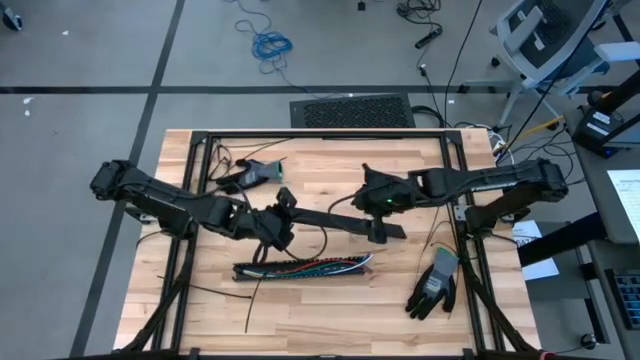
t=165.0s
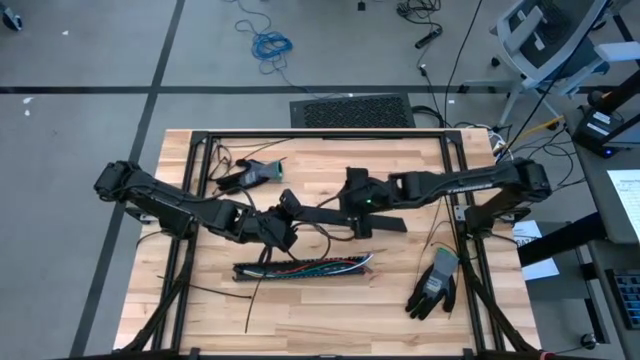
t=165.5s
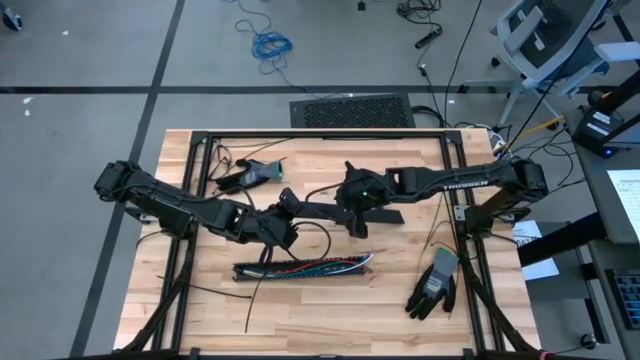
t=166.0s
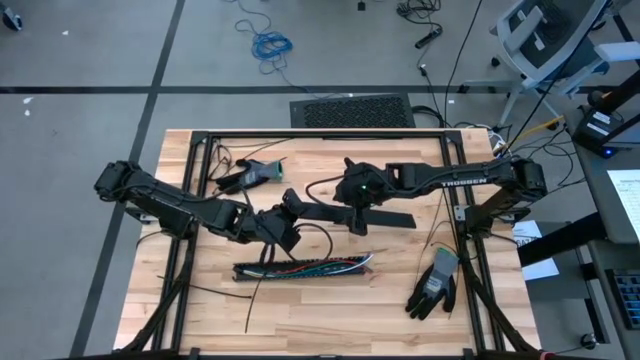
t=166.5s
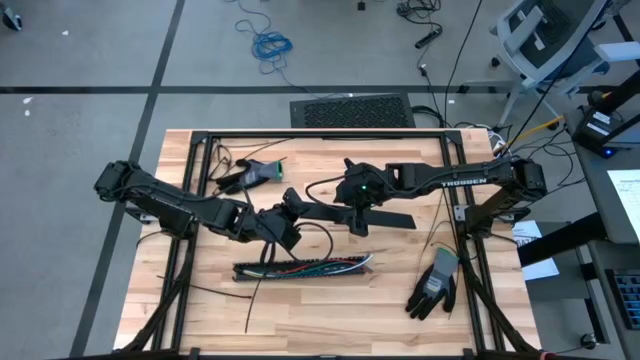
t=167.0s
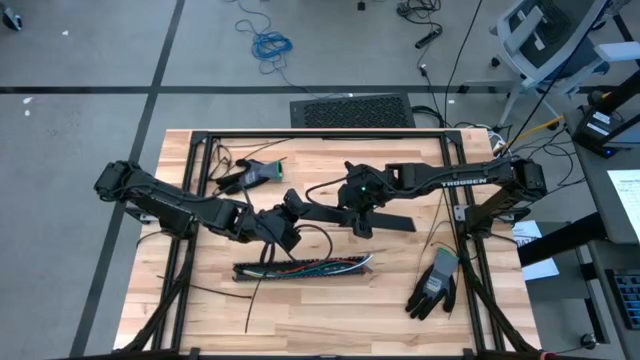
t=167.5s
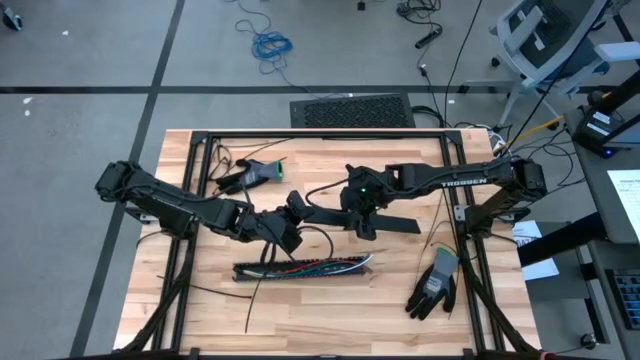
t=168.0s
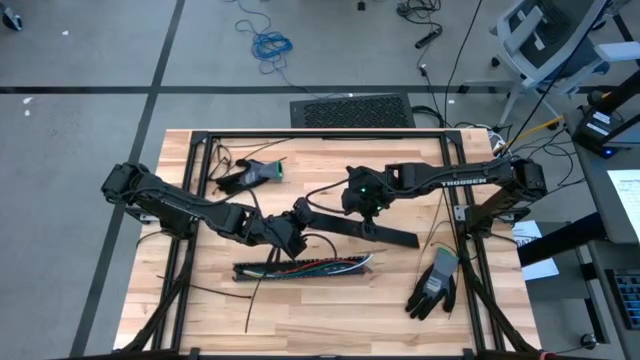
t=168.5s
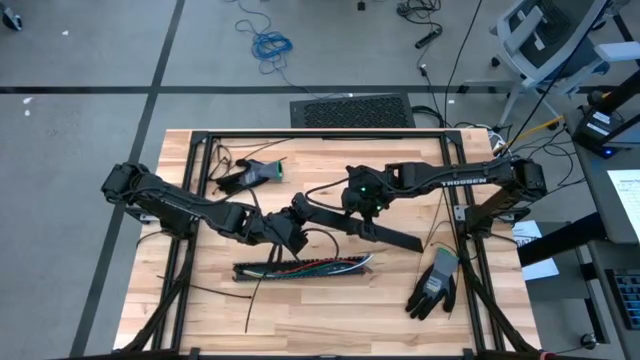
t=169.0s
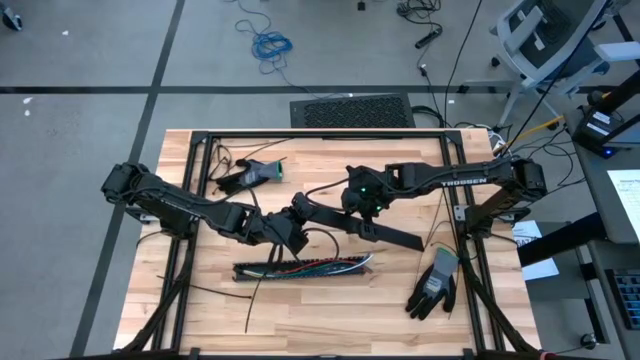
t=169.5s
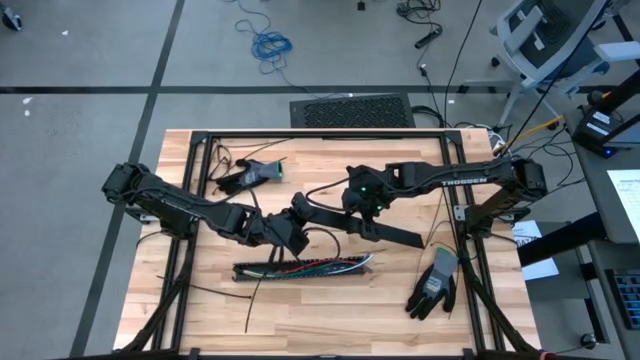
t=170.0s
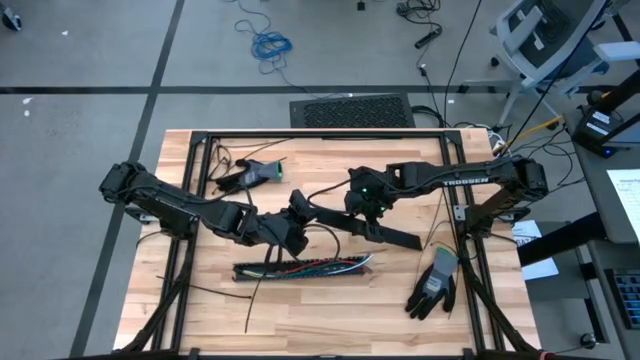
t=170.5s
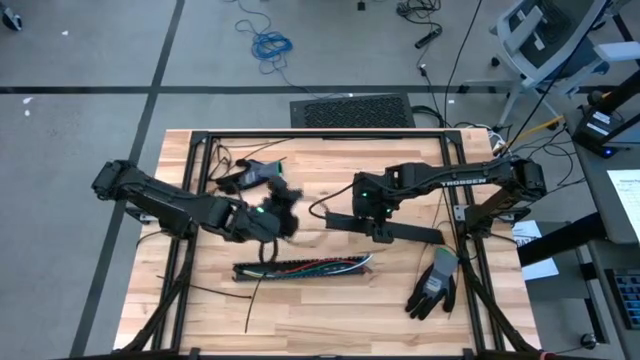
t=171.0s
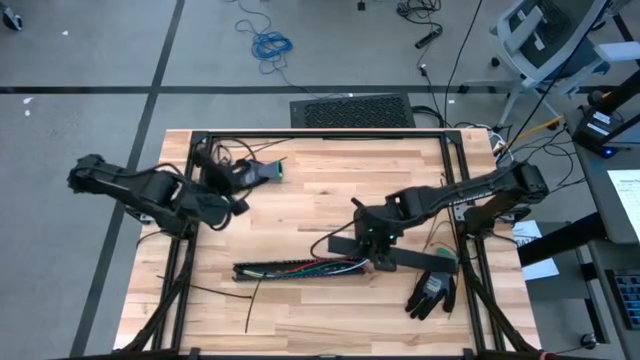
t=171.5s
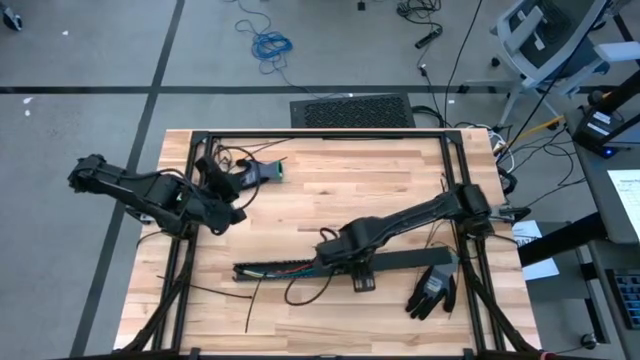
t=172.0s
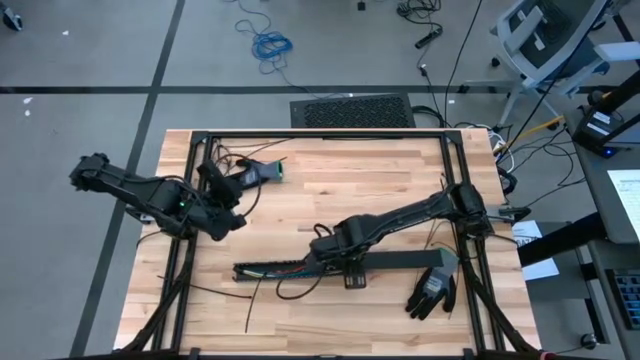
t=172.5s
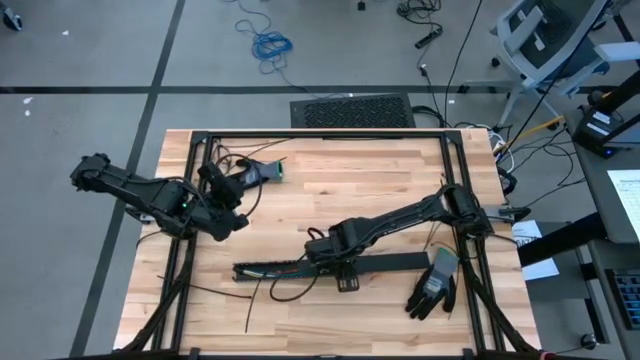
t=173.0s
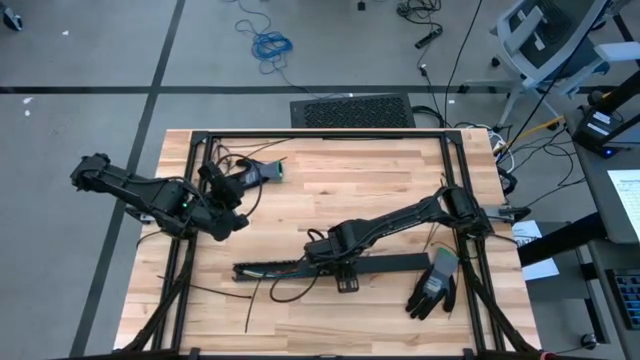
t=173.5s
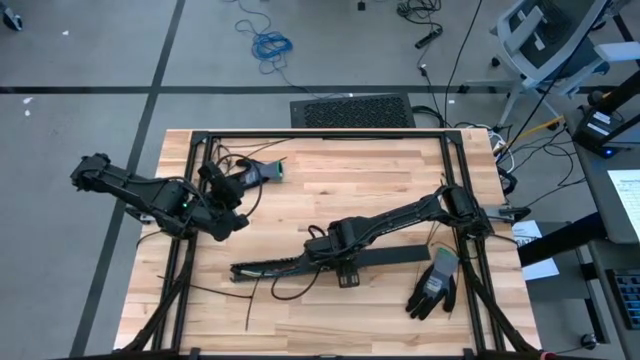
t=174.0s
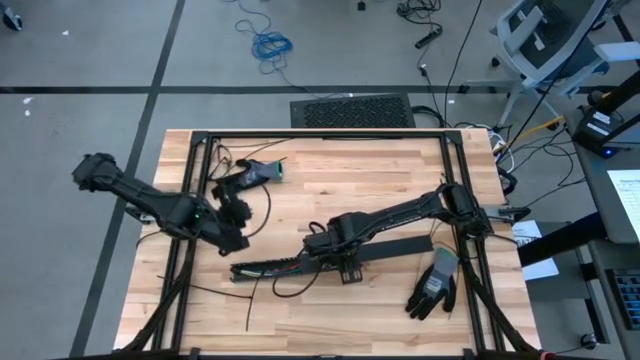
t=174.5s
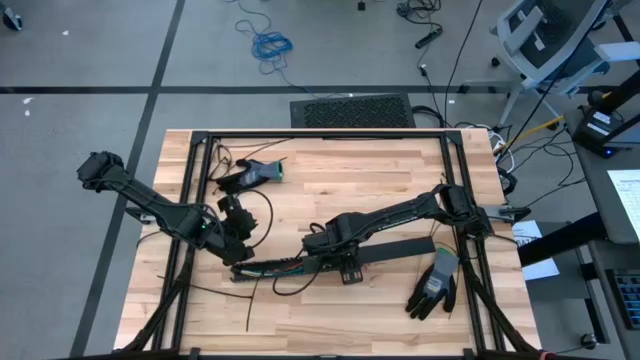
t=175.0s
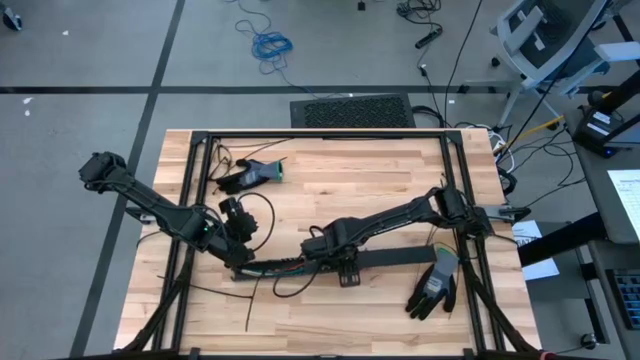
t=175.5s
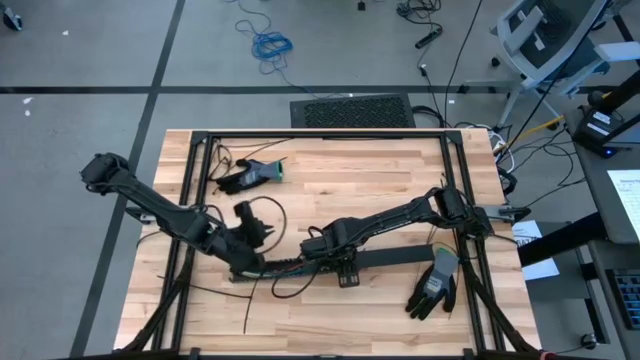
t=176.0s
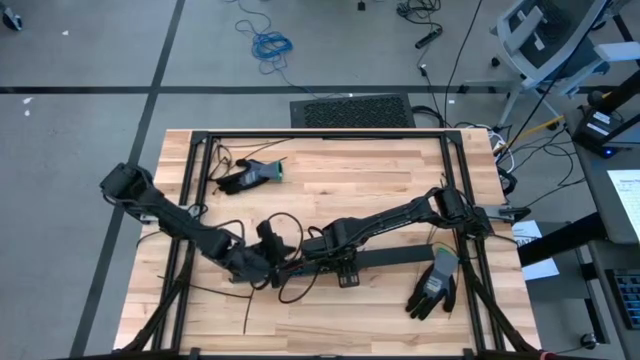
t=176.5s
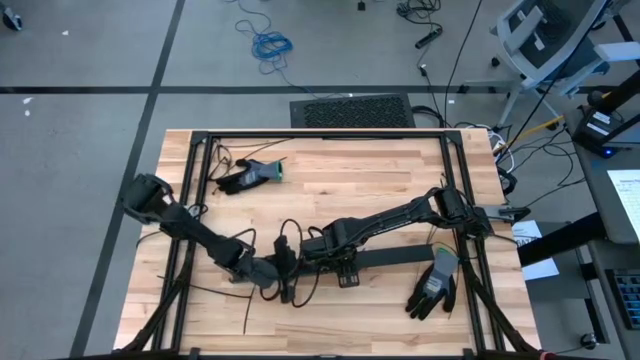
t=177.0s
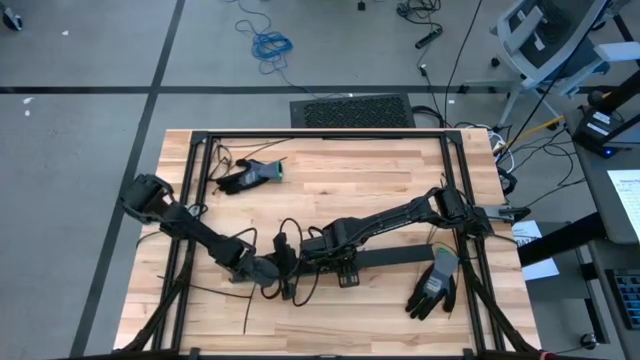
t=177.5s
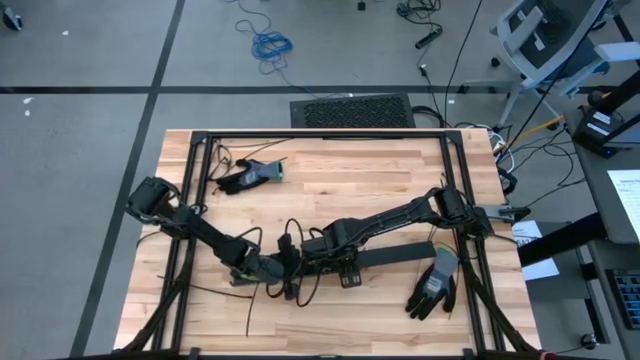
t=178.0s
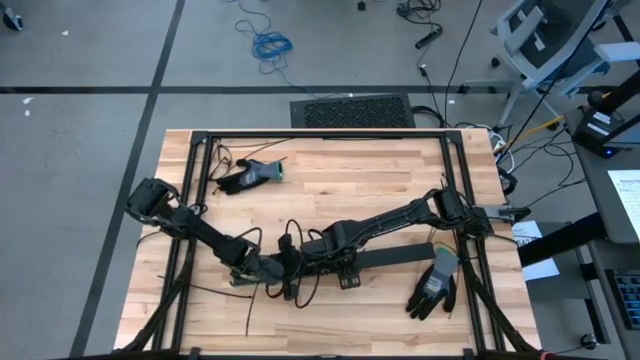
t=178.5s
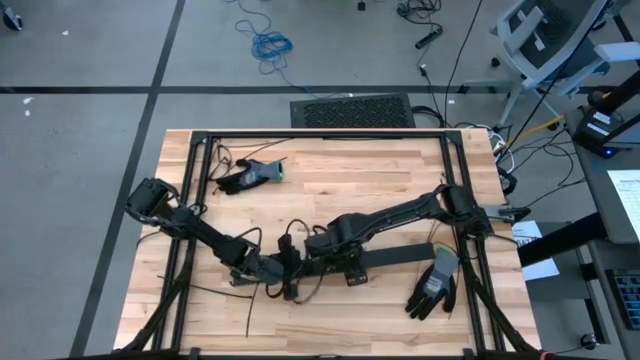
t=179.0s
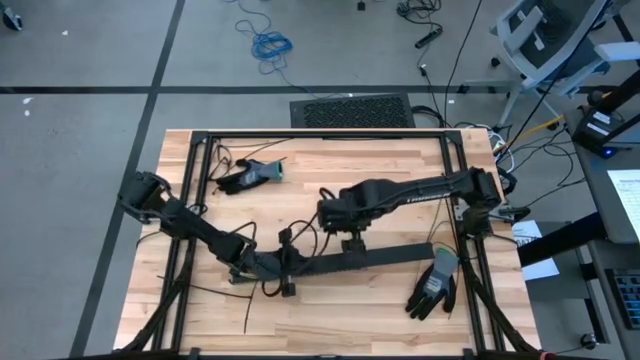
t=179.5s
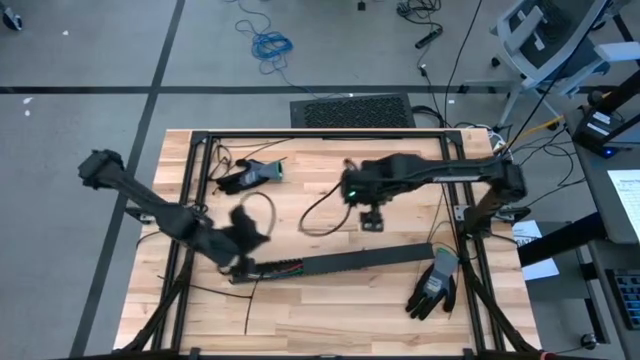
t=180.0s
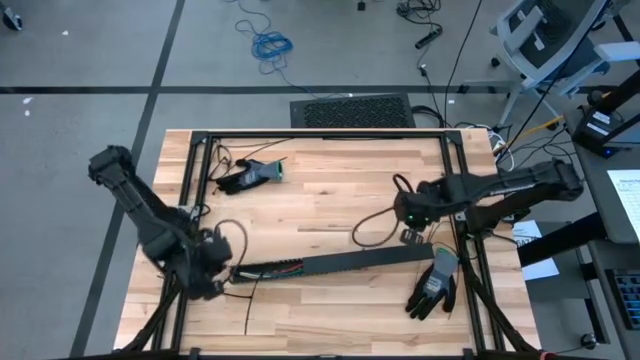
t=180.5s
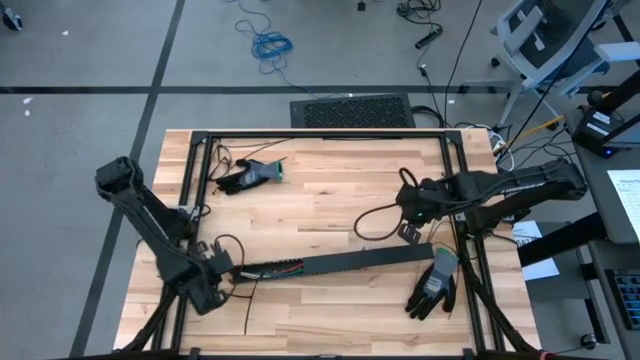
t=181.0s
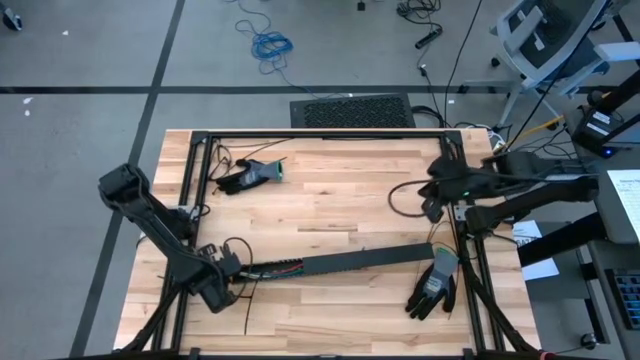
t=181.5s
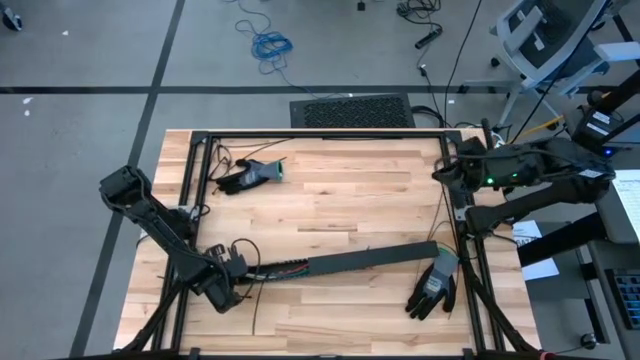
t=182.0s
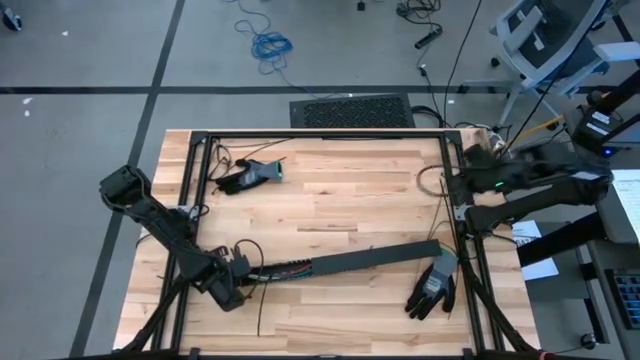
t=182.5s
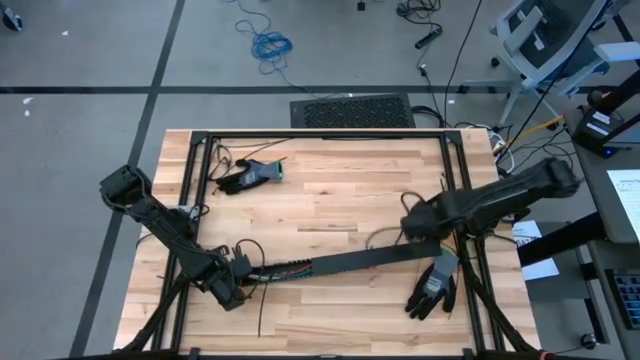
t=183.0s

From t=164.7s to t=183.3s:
Task: Ziptie cables
Close the black cable duct

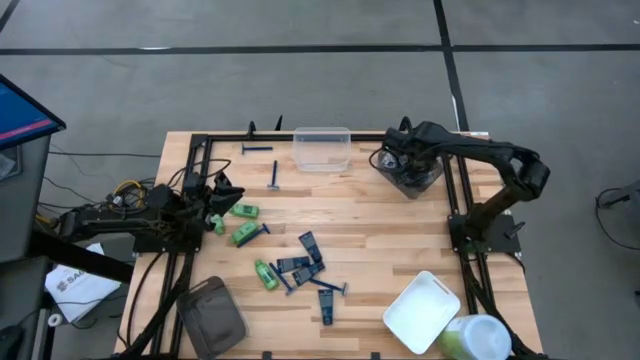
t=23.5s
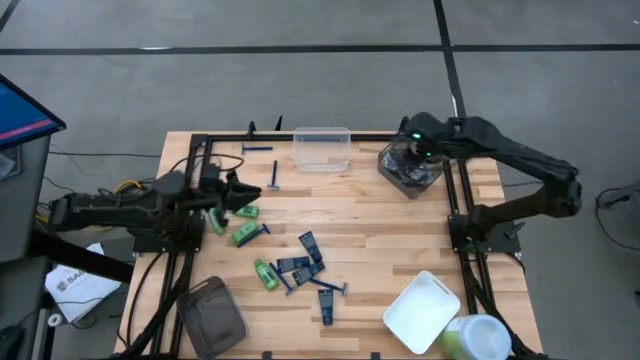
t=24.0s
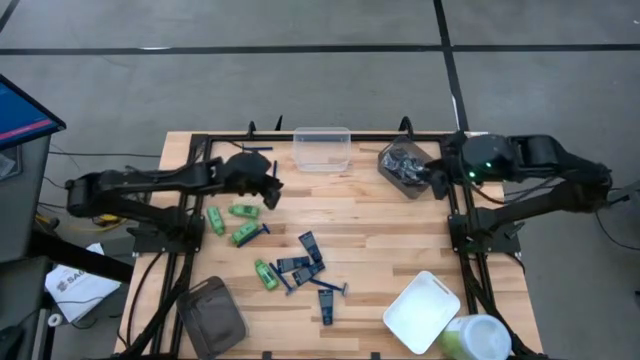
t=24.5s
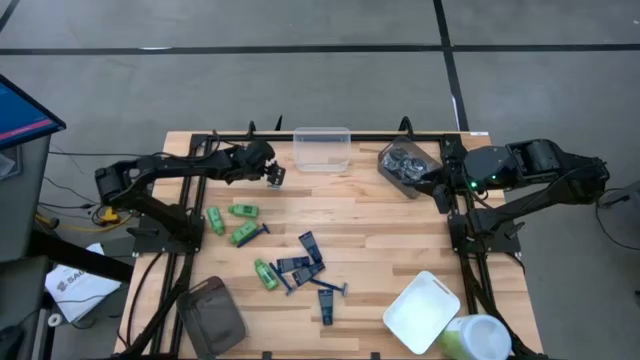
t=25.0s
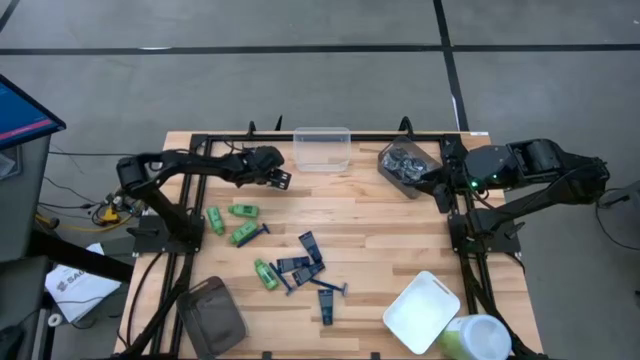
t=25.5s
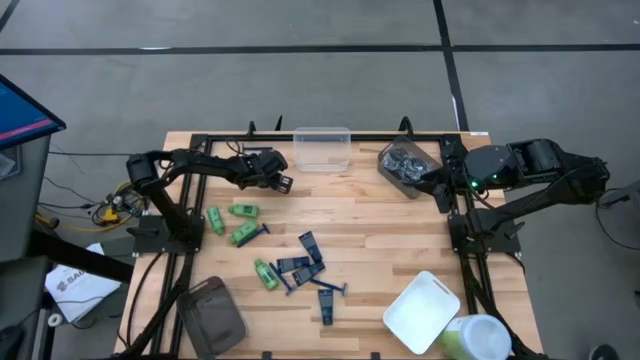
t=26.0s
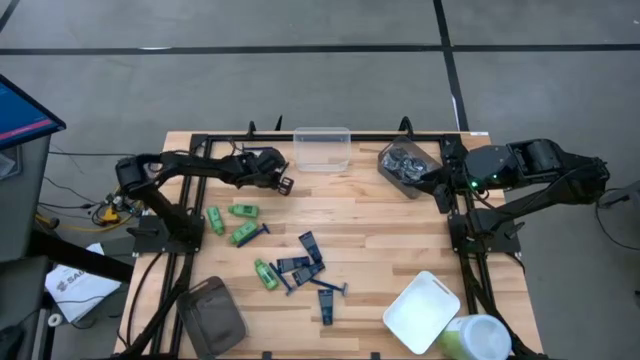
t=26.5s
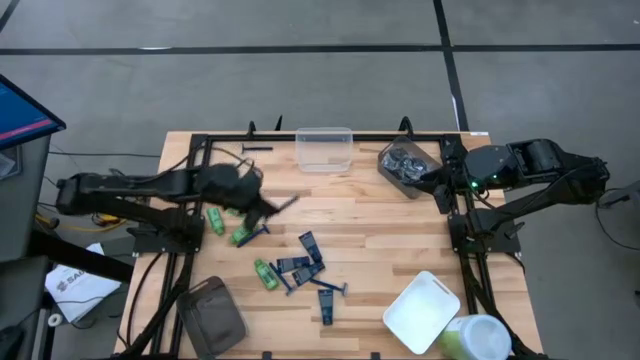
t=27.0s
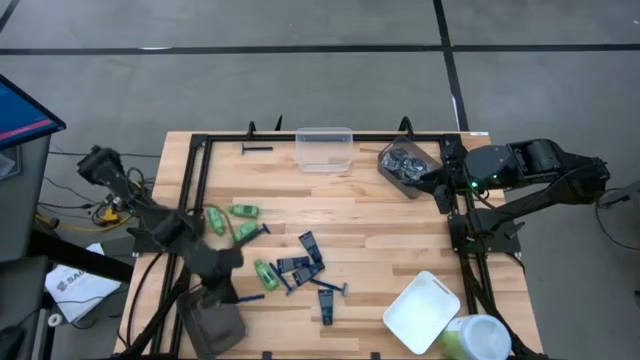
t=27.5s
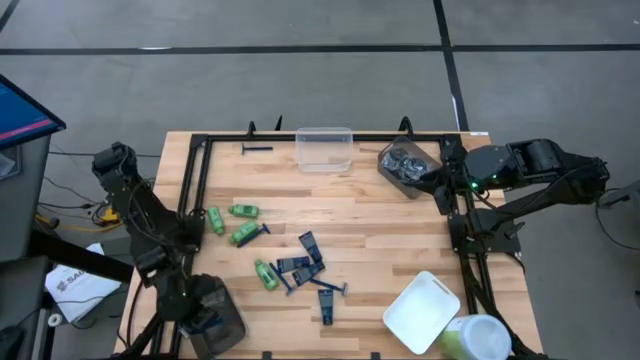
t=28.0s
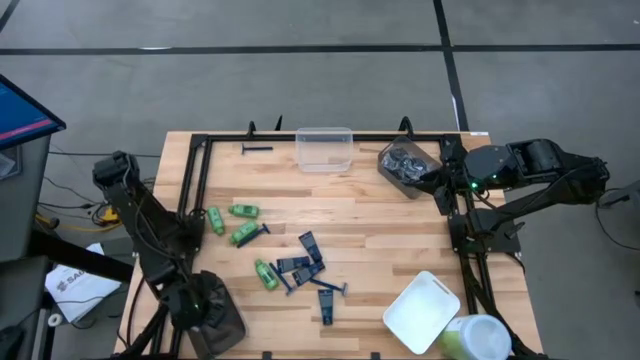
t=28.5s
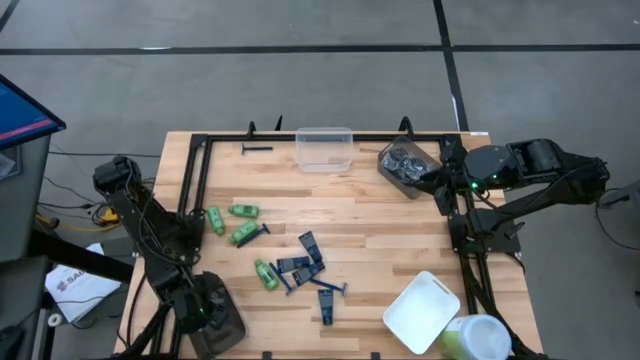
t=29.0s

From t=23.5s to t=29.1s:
Task: Pick & Place Travel size toiletries
Put the blue razor into the bottom black bin
